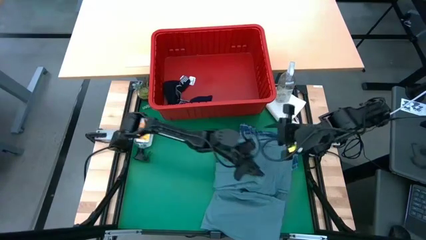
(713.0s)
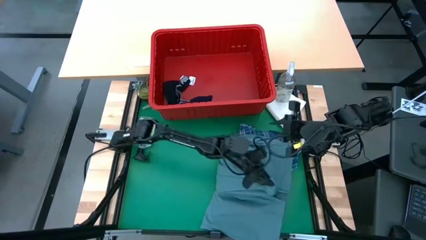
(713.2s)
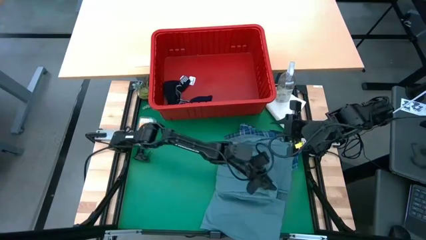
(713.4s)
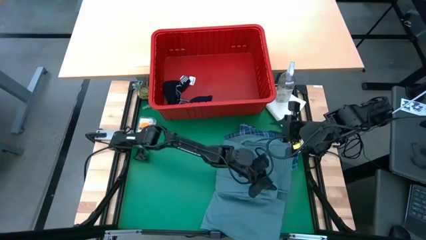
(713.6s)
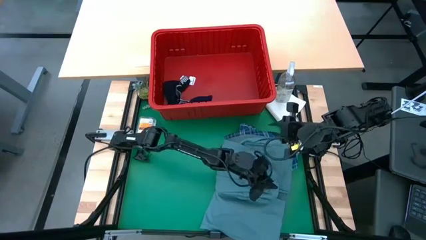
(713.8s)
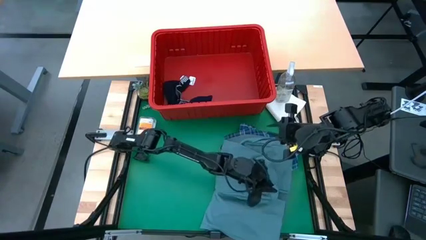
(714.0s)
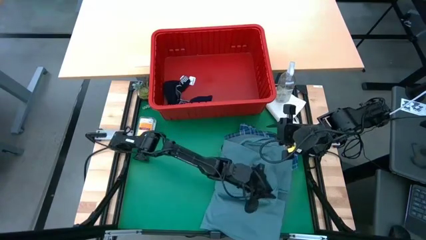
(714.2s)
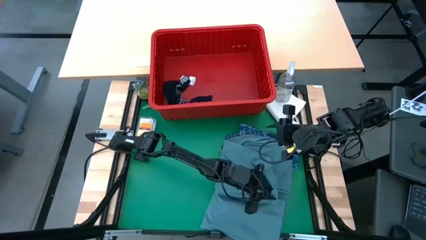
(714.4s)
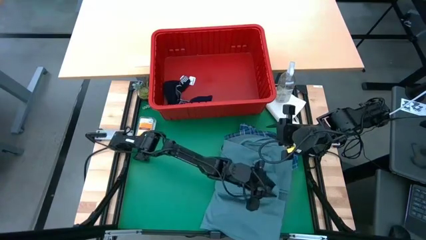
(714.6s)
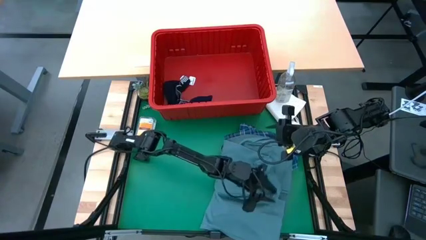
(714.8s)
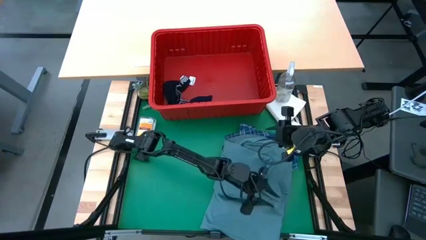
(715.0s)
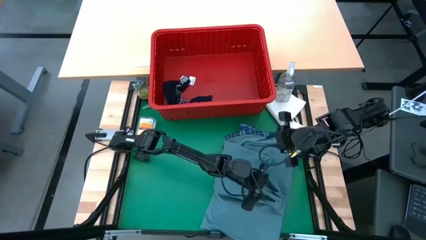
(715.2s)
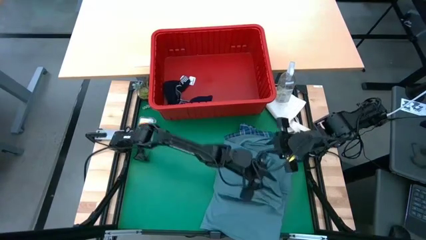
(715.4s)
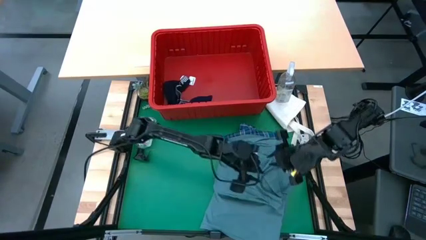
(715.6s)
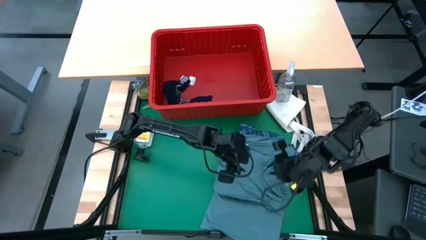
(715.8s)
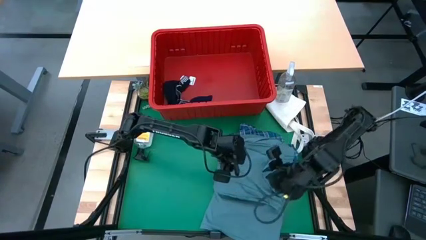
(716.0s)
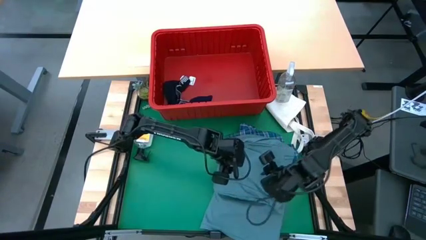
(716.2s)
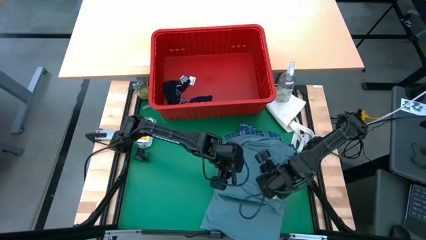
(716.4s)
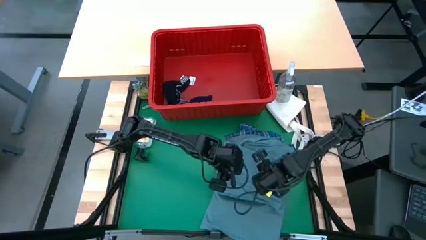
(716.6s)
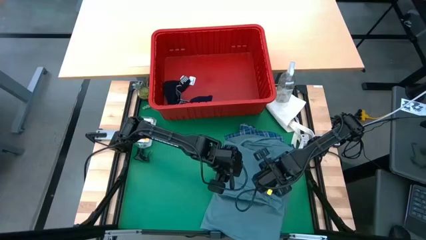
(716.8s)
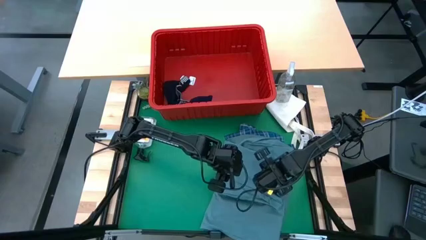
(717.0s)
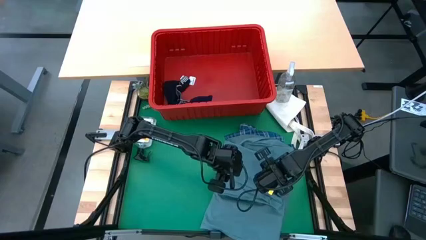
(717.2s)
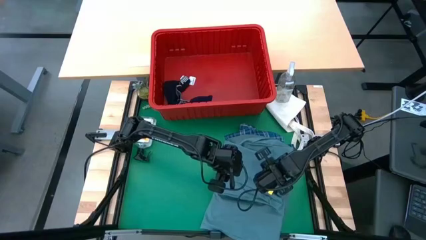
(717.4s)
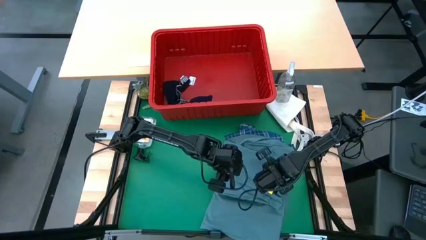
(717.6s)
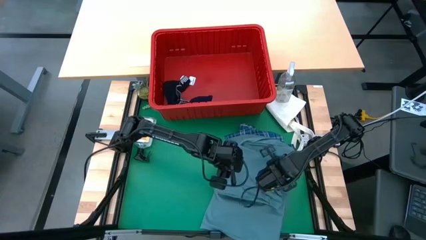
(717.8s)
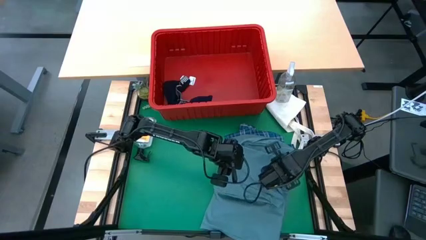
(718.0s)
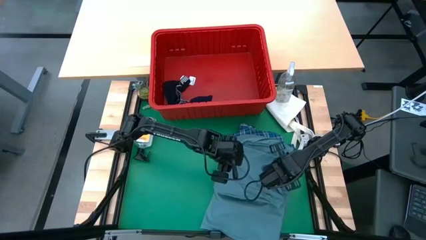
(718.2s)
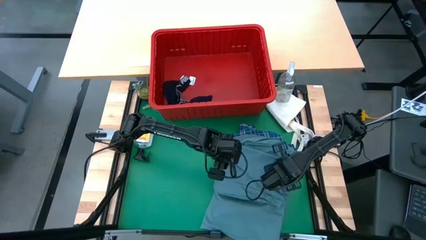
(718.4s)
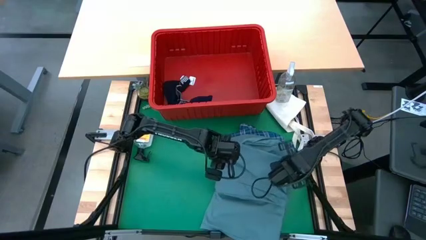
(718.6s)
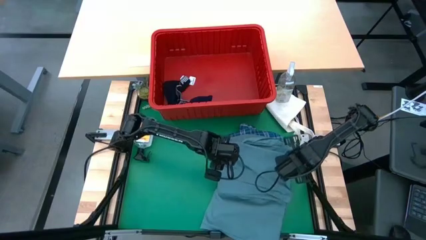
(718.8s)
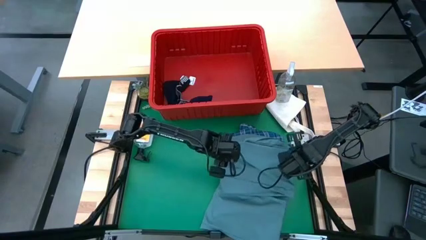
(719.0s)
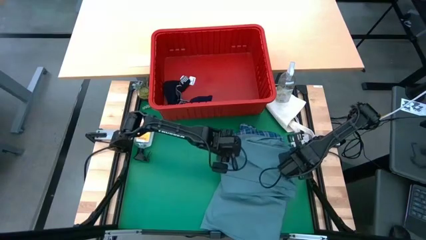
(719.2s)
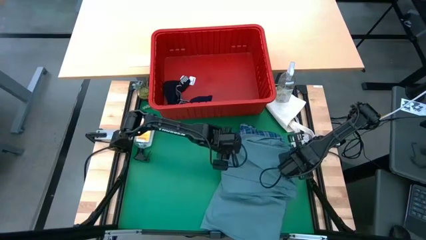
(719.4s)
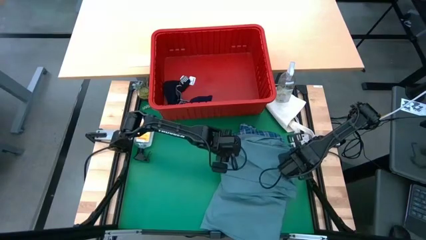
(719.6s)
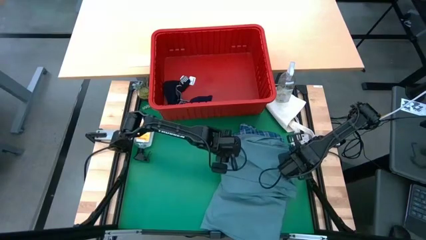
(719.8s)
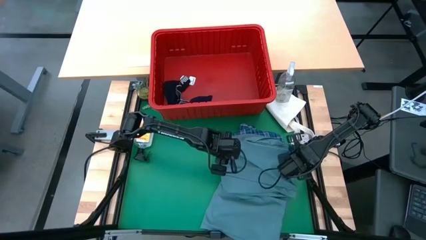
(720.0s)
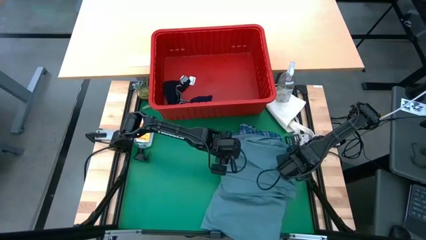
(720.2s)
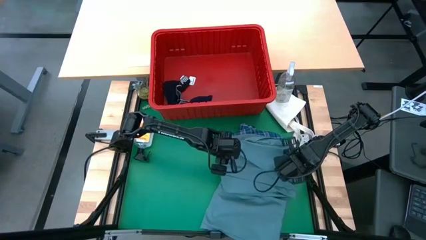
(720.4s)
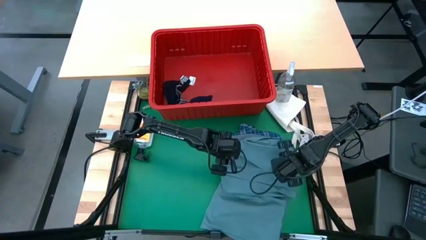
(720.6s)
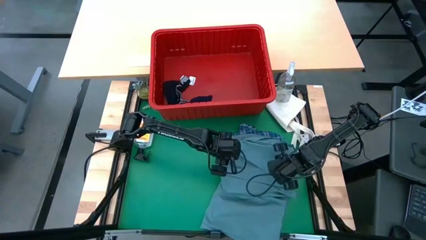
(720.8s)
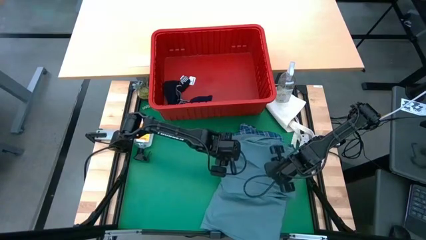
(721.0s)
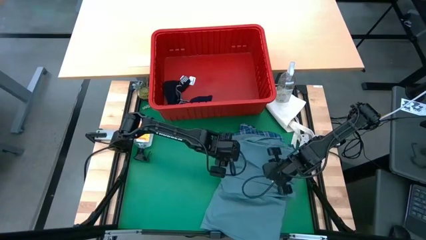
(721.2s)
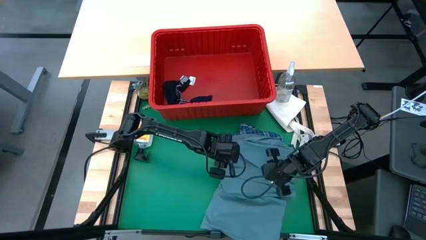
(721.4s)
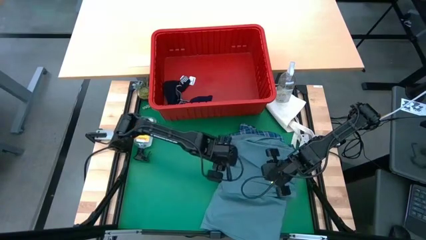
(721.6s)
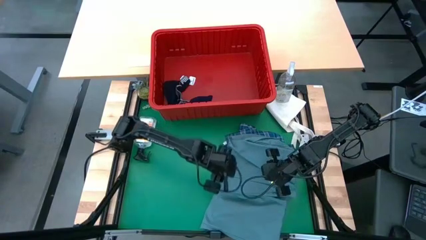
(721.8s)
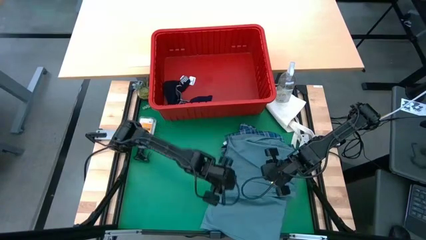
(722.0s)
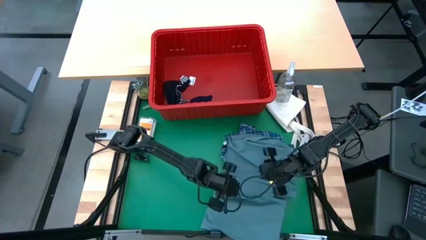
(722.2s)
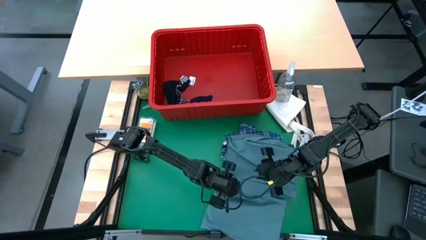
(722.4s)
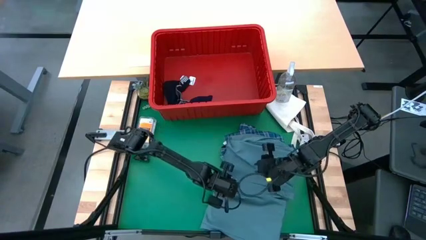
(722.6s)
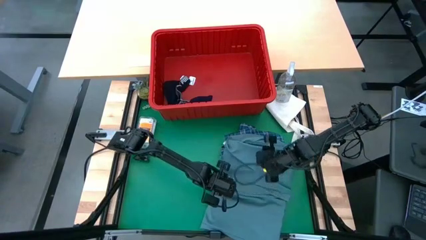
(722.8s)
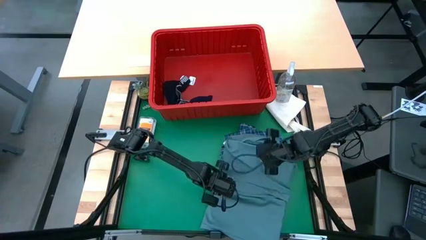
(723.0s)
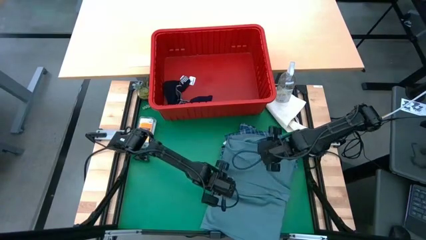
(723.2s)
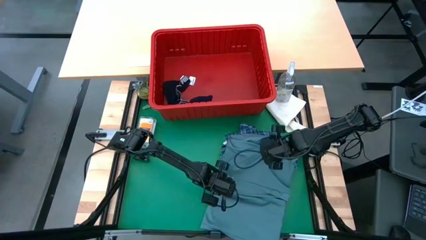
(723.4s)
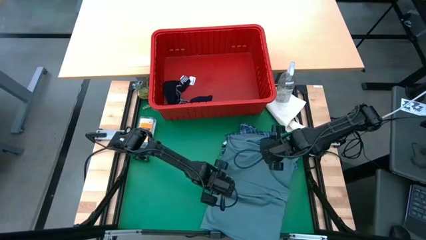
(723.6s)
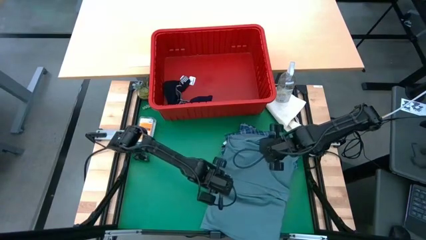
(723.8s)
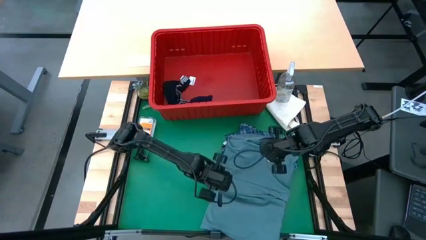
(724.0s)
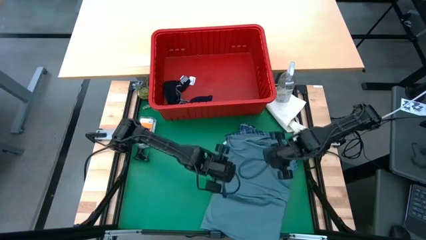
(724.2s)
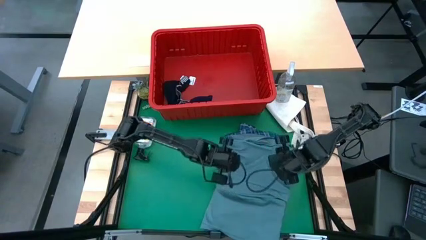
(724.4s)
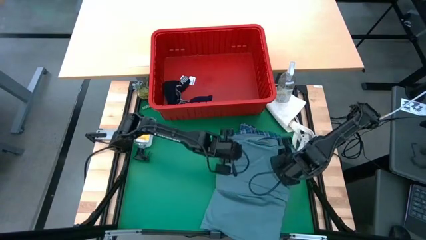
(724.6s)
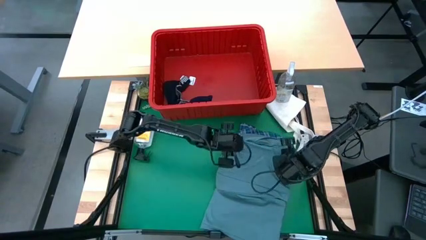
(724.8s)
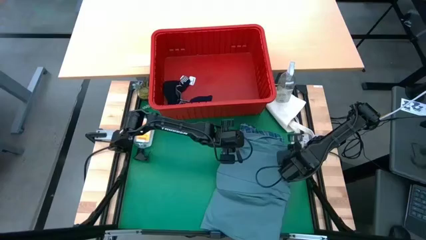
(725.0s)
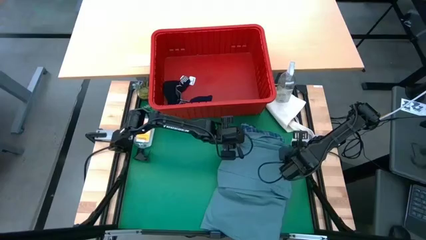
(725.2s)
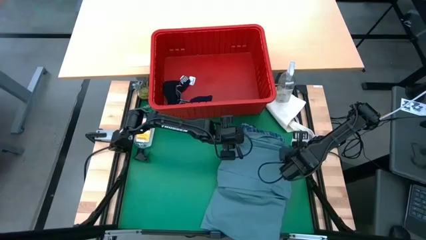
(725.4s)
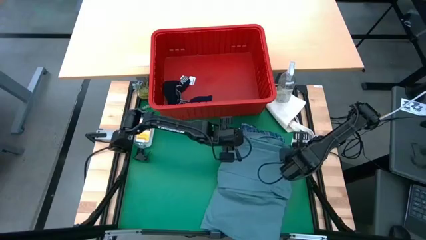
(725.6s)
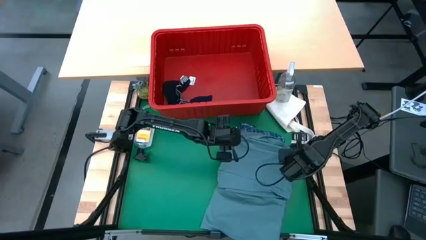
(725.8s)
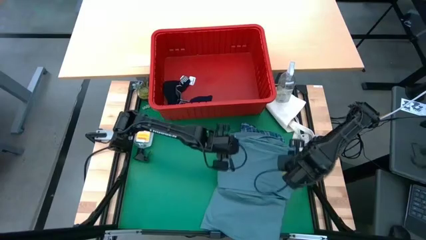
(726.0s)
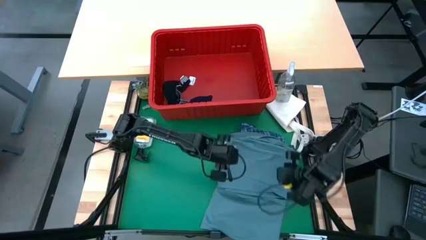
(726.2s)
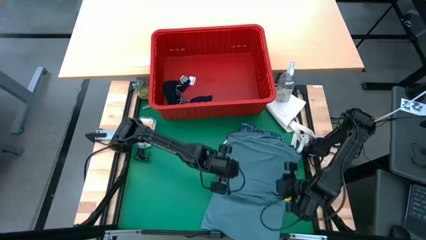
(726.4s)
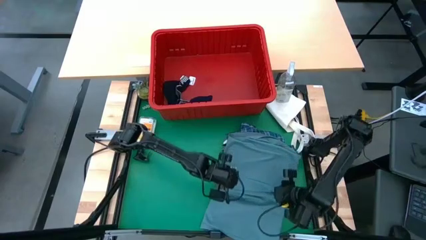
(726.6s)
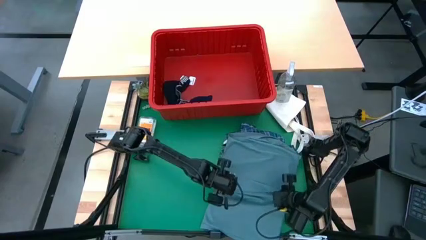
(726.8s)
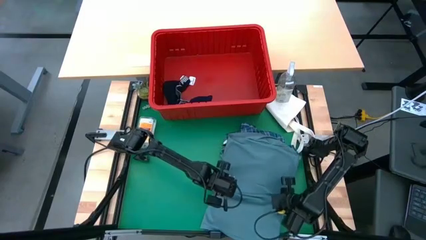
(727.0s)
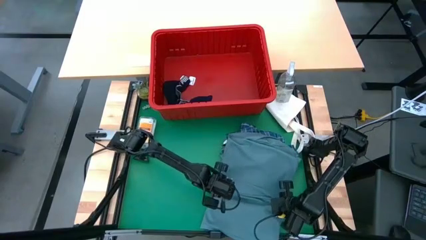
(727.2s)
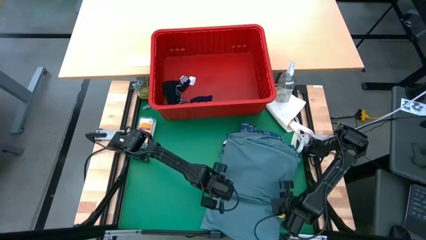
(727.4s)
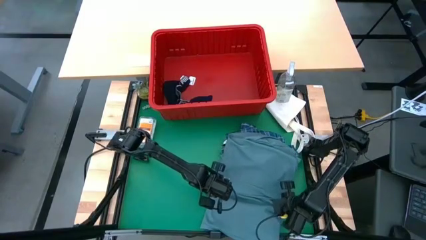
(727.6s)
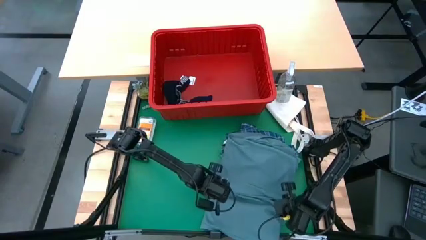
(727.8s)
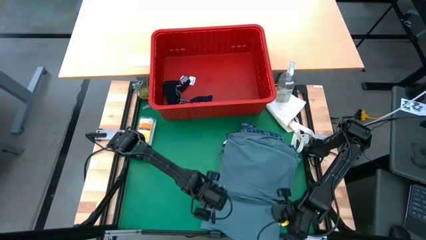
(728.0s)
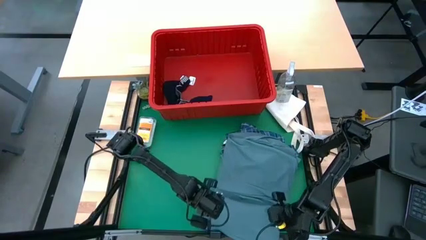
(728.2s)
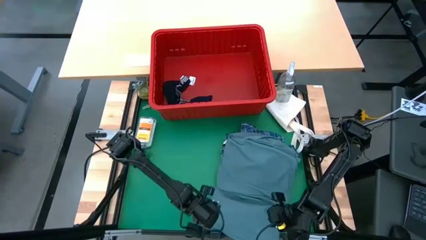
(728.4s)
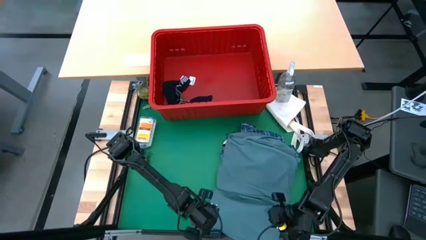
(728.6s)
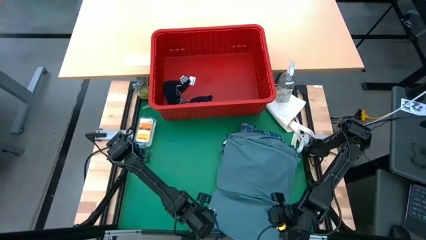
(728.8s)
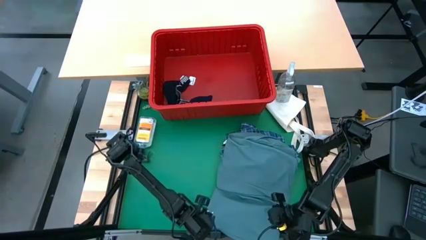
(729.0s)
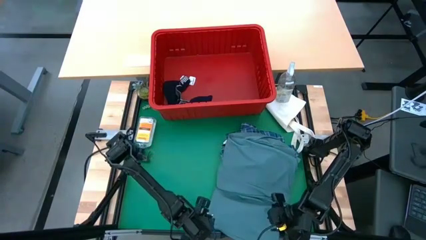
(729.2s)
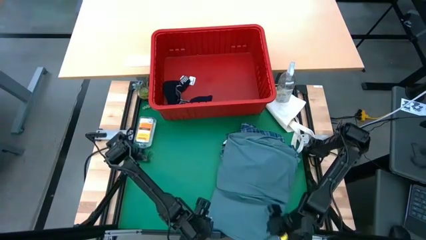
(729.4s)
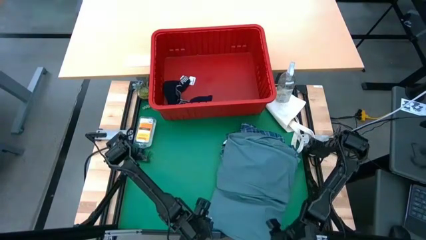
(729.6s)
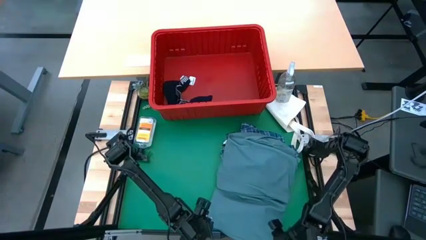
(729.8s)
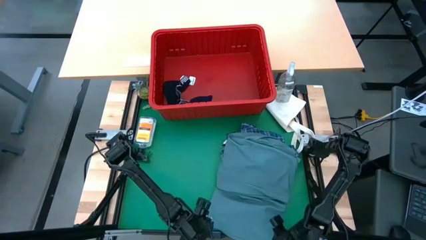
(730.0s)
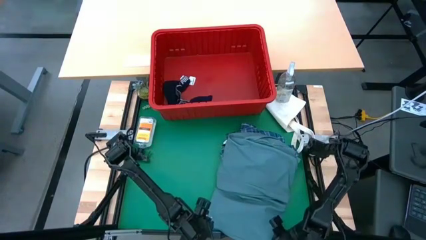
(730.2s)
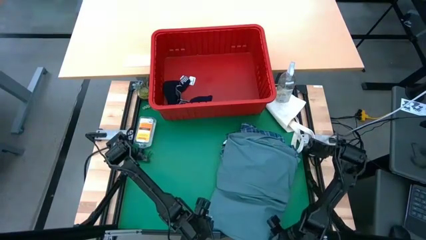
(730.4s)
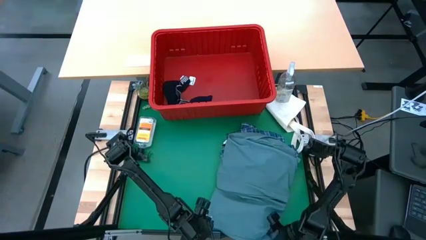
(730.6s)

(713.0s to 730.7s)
Task: Fold Laundry from Bin
Fold the blue pants on top of the blue shirt
